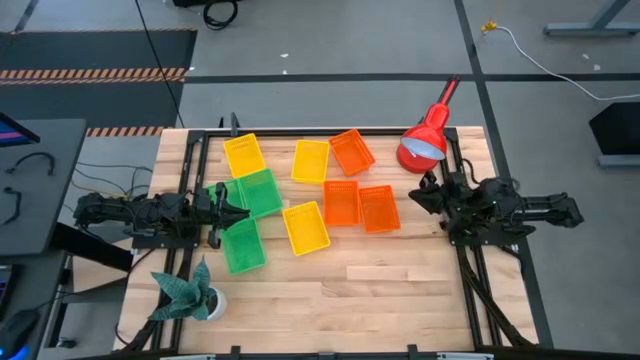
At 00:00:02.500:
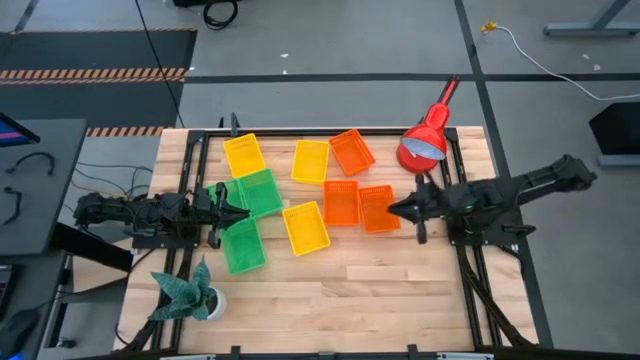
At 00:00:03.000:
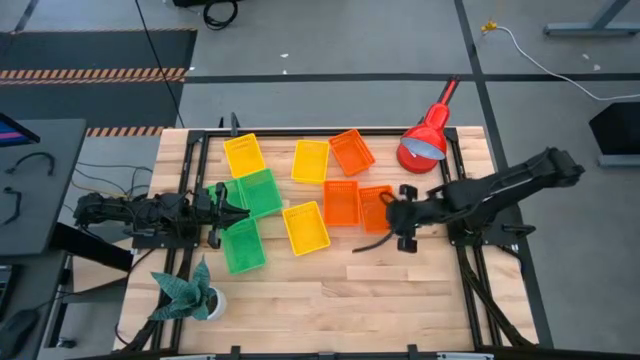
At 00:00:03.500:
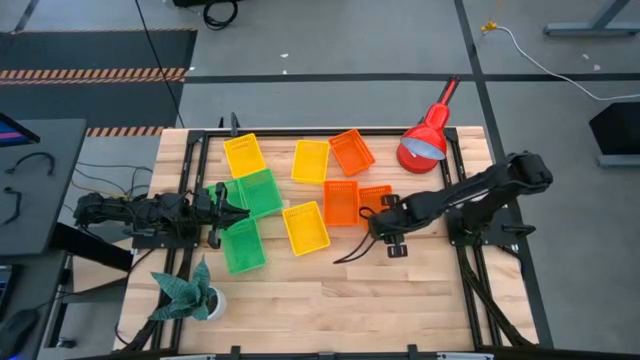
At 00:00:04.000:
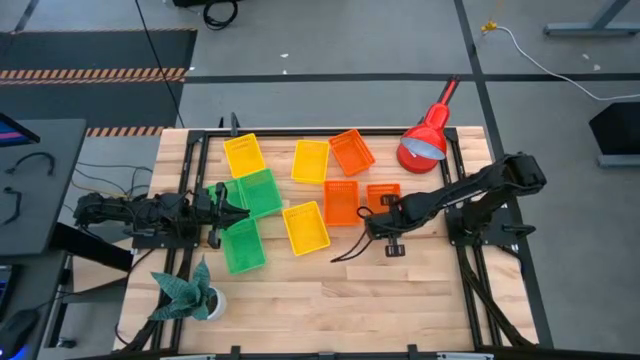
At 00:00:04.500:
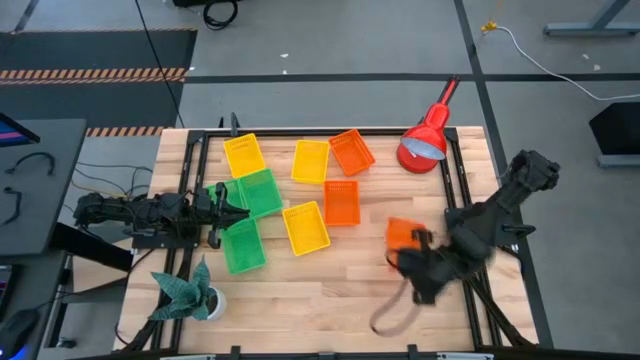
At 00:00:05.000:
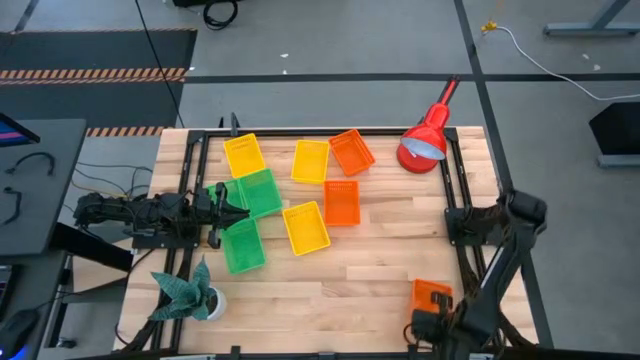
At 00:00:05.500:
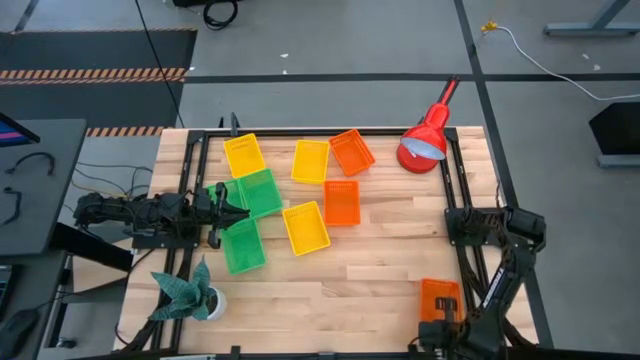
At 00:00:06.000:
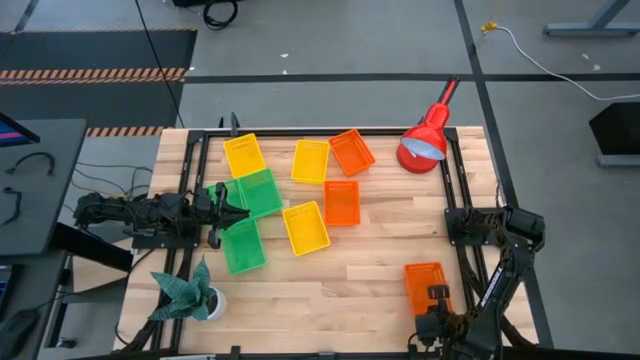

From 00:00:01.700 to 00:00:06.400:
Move the orange basket on the bottom right of the table

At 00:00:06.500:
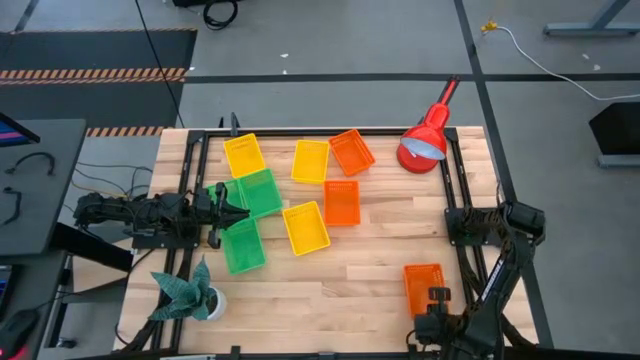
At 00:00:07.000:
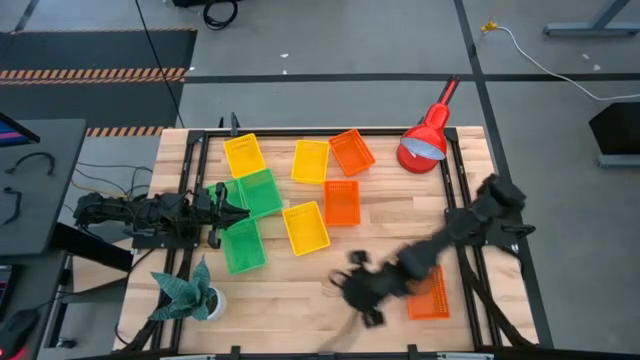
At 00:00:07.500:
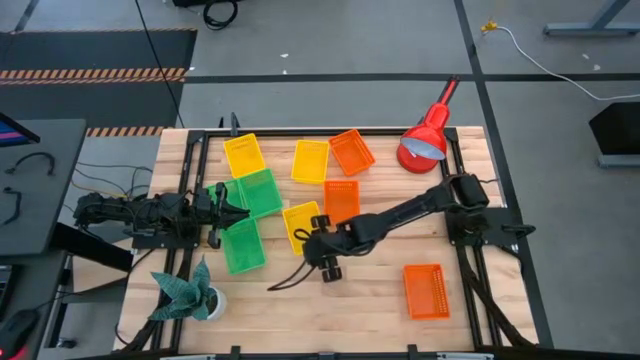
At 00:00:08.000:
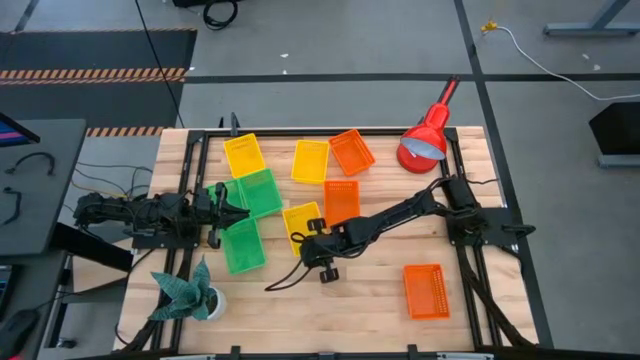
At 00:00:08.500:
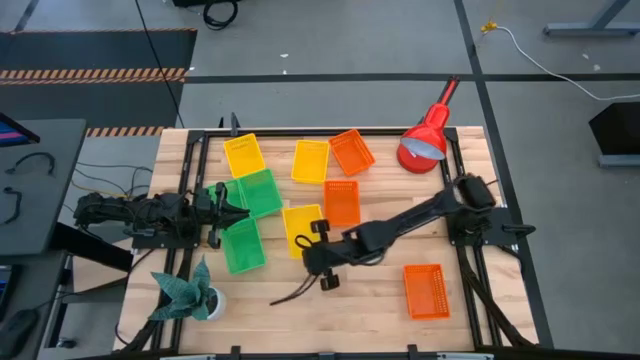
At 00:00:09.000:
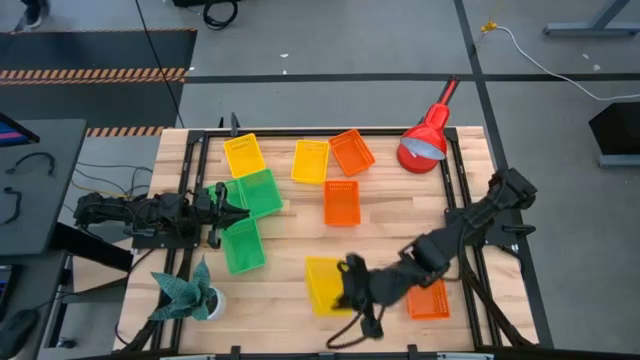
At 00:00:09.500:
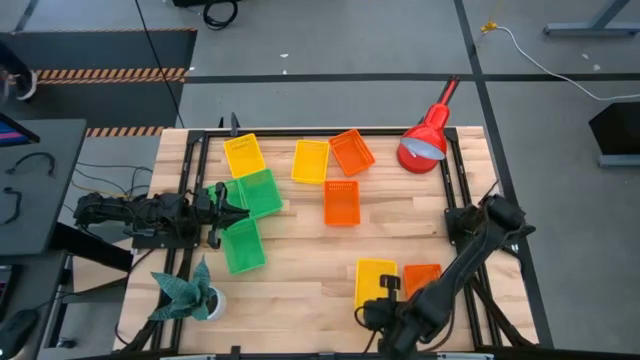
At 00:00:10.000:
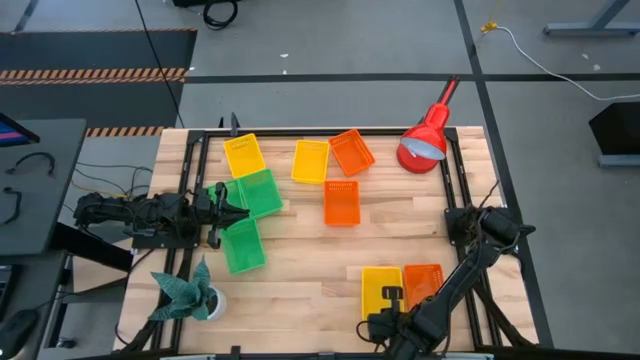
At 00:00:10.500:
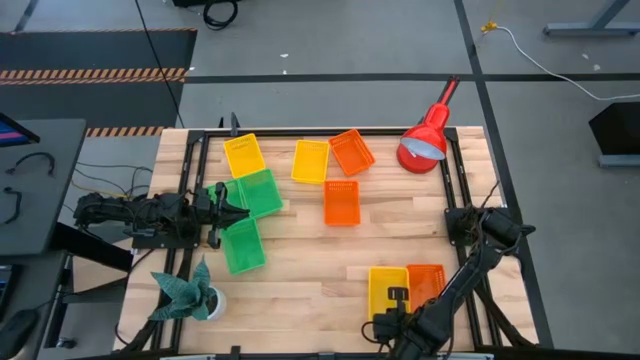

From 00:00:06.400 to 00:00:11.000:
Move the yellow basket on the bottom right of the table

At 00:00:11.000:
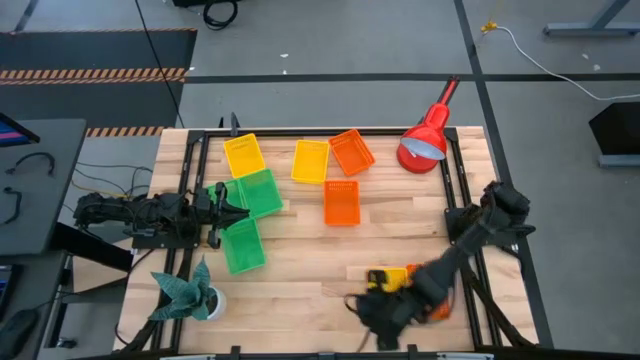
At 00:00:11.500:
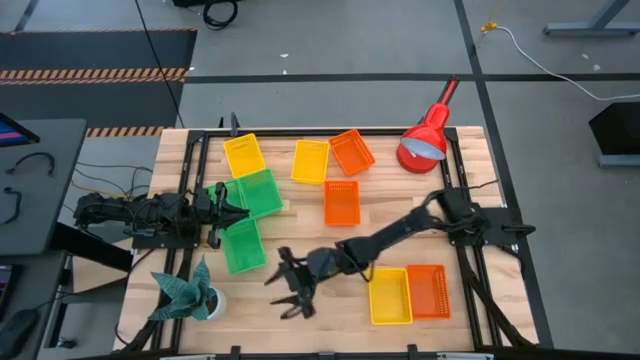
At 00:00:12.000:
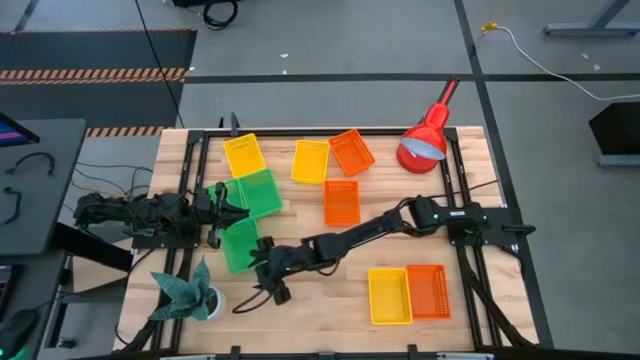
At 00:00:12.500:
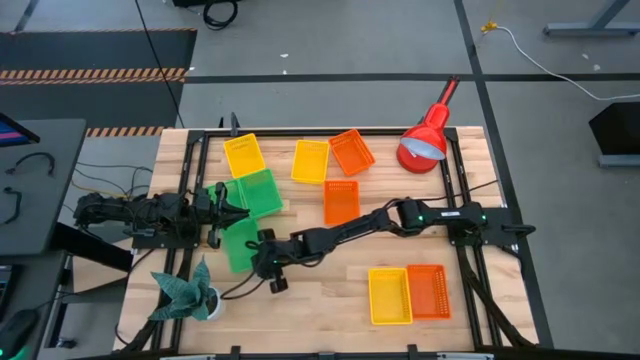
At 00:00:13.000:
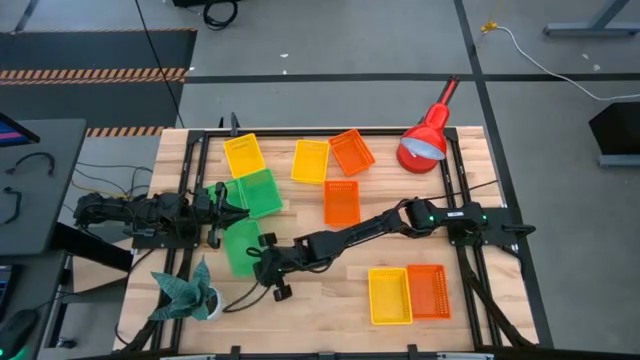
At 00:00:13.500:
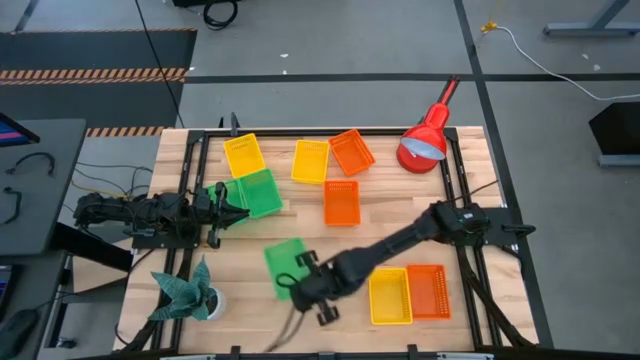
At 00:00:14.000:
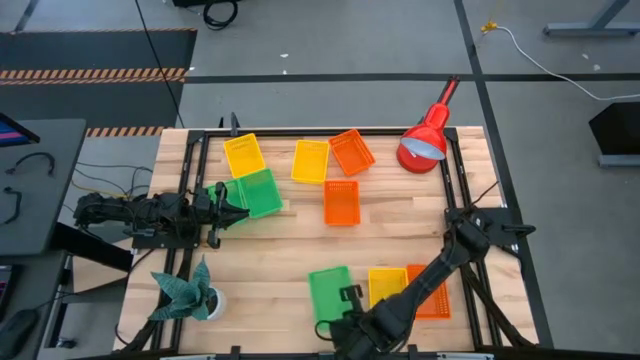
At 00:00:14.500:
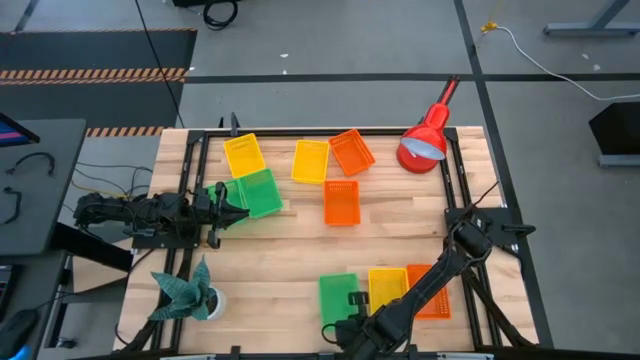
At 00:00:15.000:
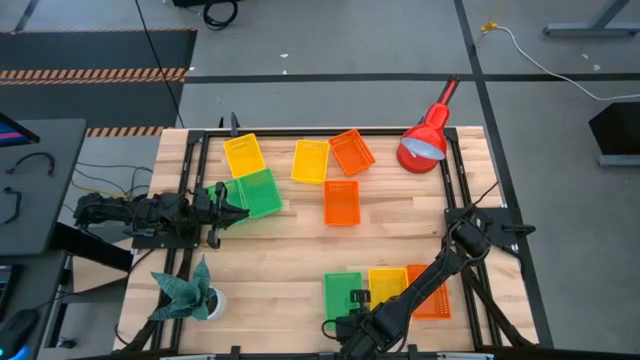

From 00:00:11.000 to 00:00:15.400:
Move the green basket on the bottom center of the table

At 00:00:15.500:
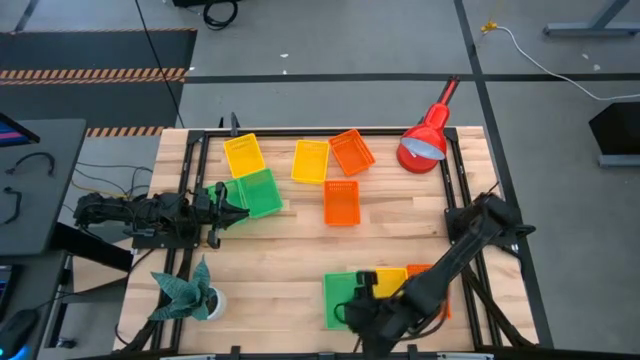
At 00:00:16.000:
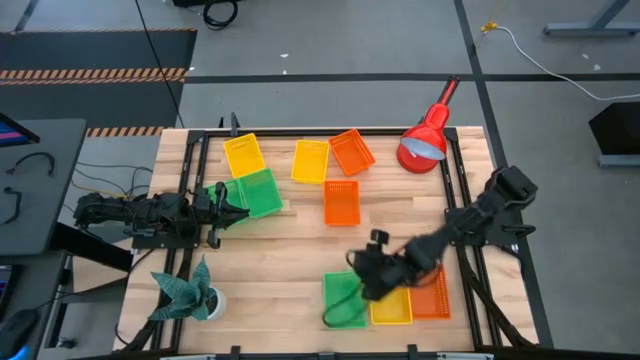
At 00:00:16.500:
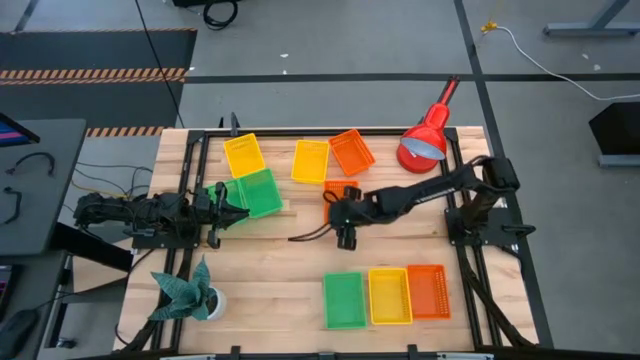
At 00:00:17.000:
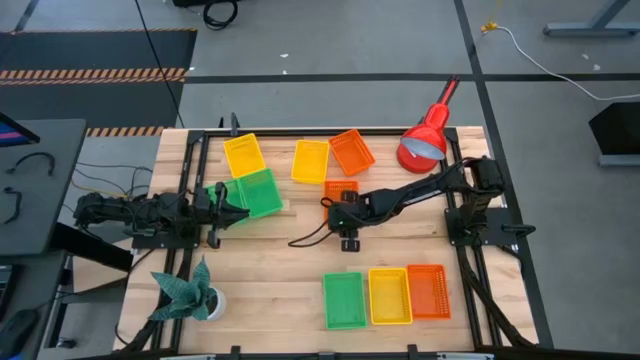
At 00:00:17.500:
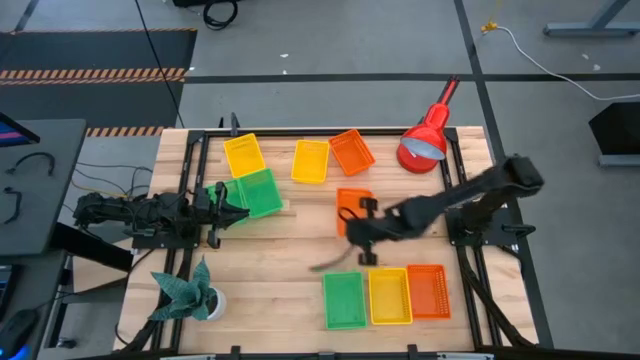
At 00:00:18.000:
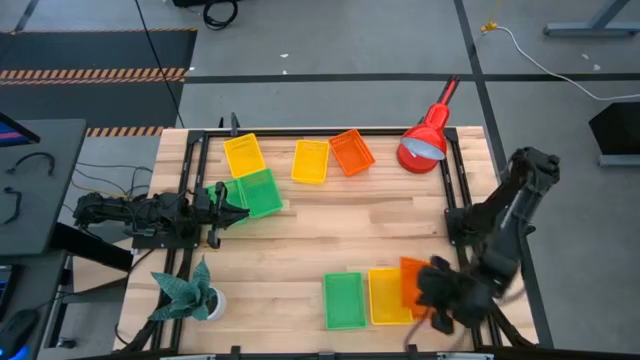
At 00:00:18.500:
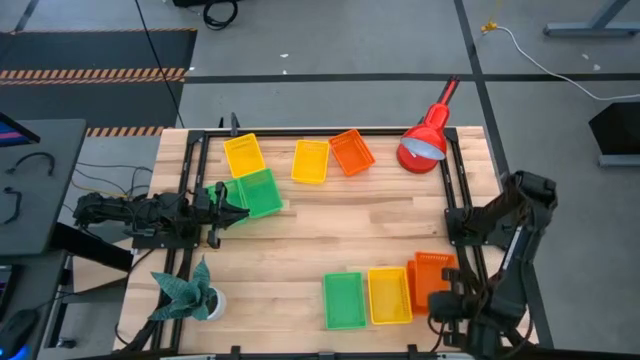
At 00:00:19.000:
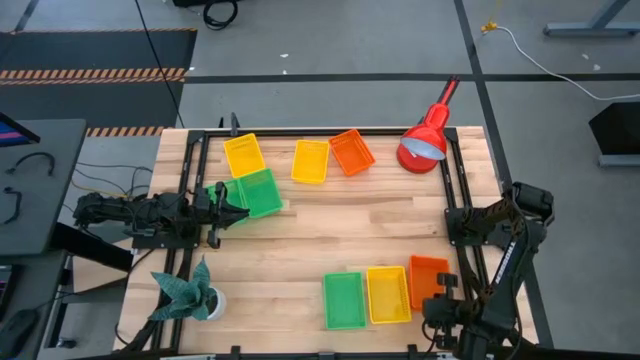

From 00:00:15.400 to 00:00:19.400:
Stack the middle left orange basket on the bottom right orange basket
